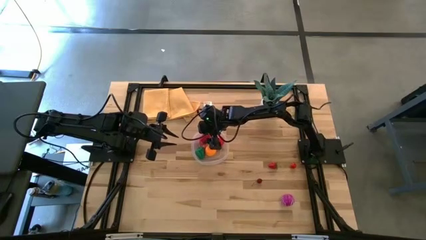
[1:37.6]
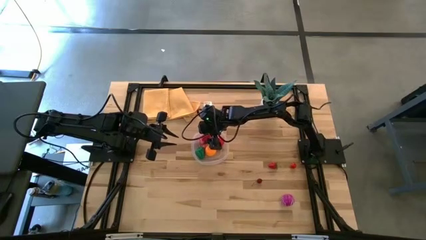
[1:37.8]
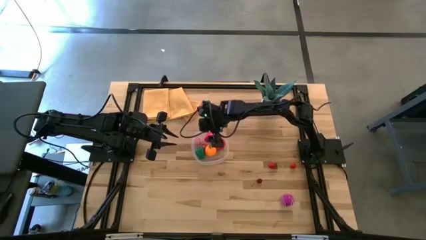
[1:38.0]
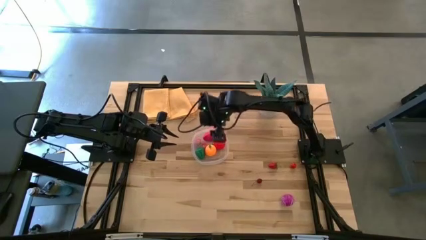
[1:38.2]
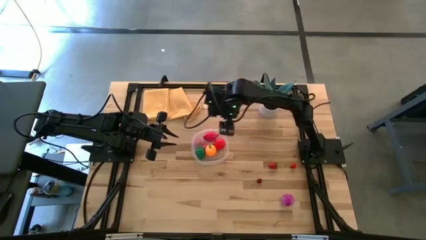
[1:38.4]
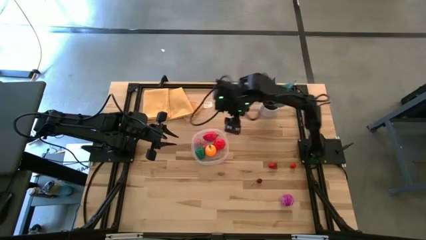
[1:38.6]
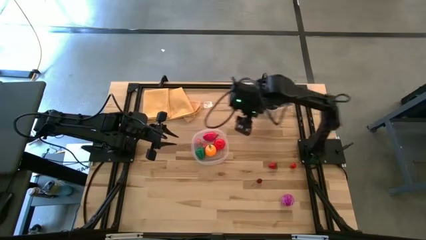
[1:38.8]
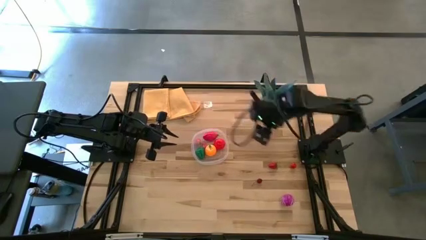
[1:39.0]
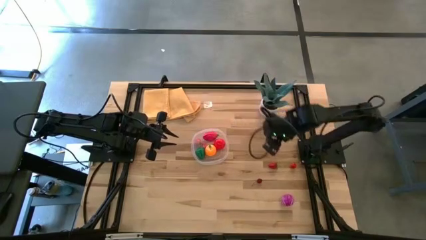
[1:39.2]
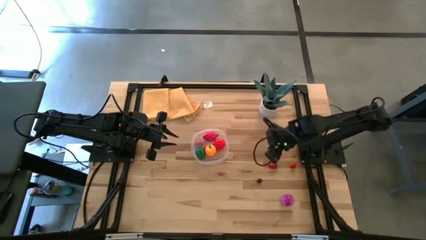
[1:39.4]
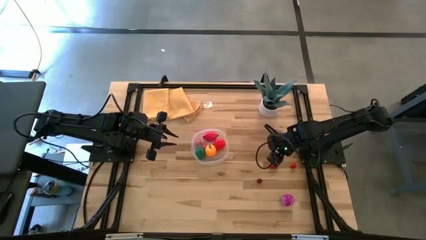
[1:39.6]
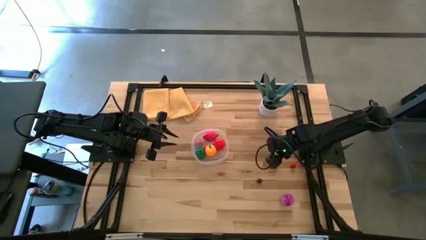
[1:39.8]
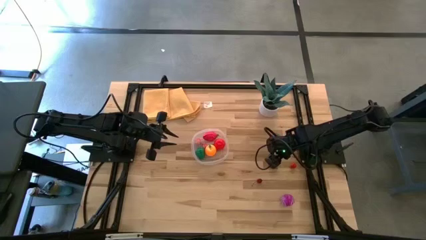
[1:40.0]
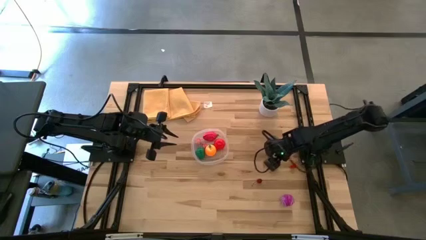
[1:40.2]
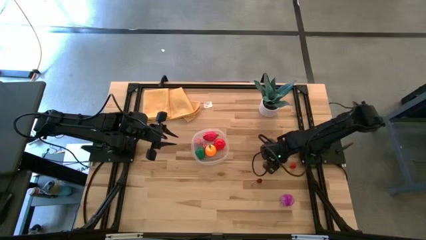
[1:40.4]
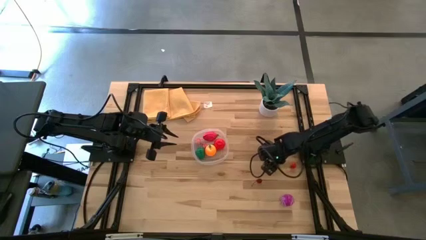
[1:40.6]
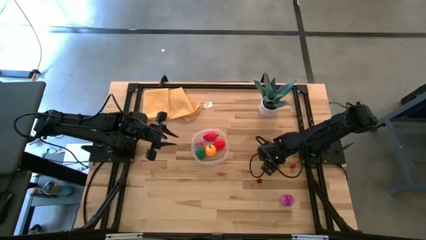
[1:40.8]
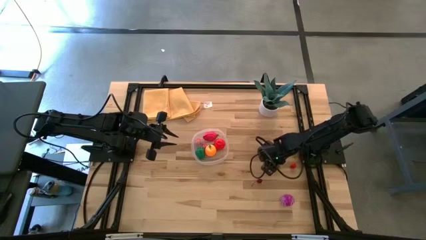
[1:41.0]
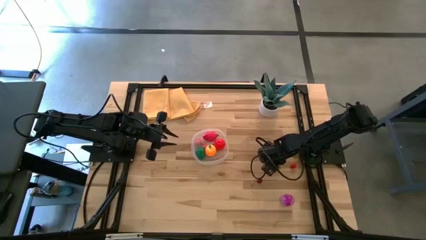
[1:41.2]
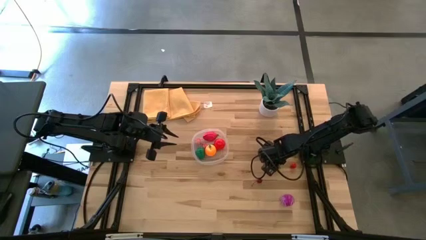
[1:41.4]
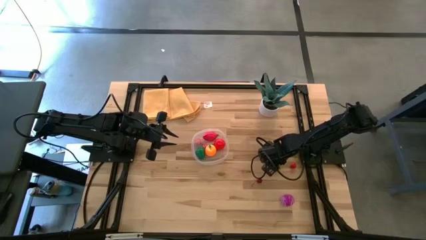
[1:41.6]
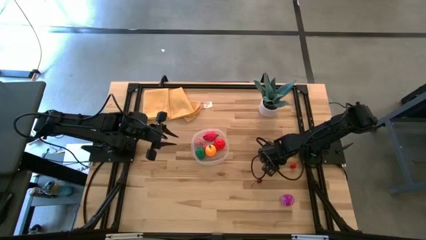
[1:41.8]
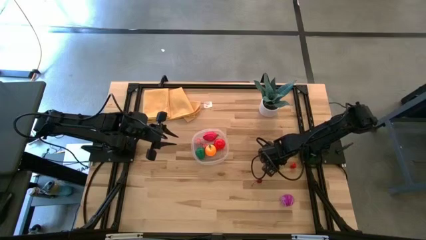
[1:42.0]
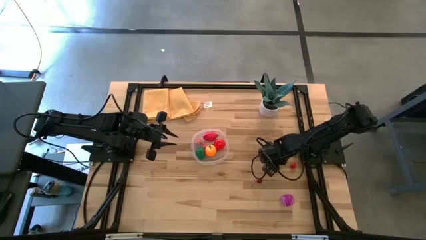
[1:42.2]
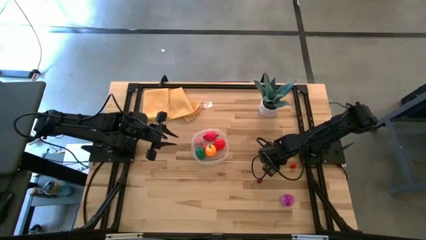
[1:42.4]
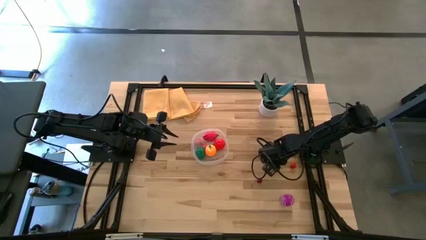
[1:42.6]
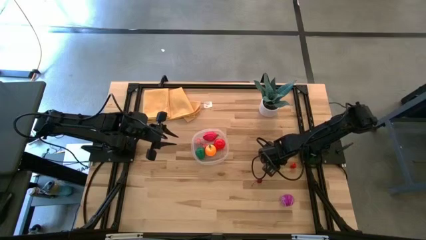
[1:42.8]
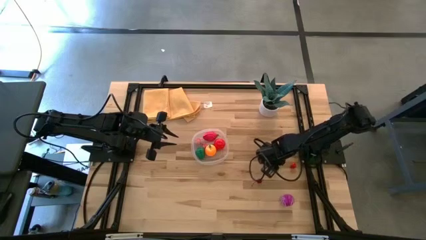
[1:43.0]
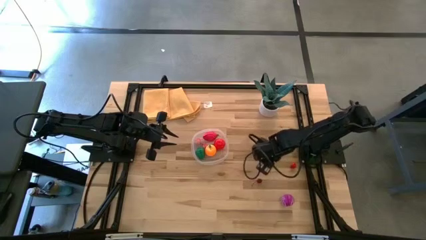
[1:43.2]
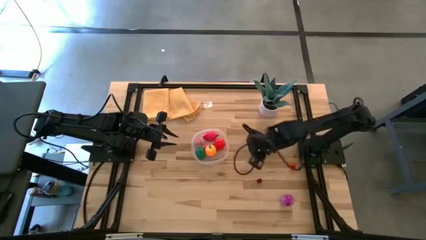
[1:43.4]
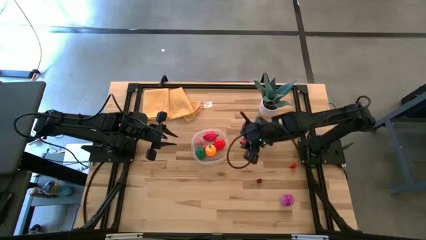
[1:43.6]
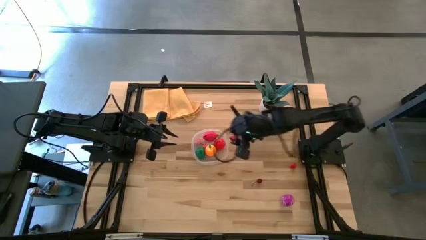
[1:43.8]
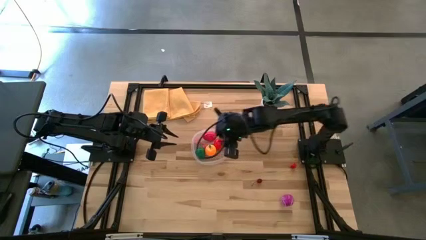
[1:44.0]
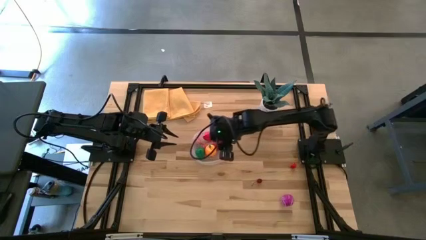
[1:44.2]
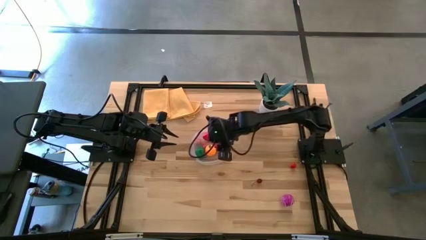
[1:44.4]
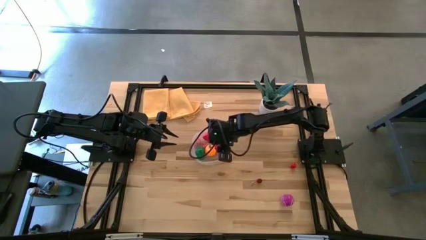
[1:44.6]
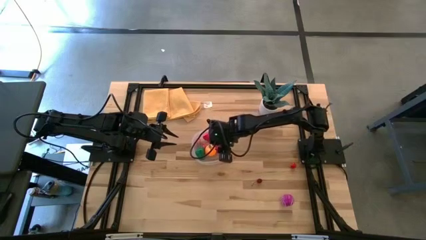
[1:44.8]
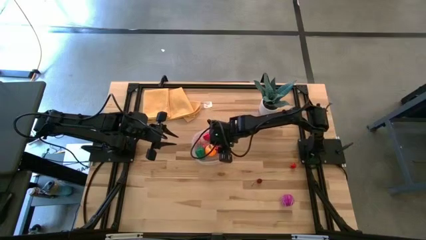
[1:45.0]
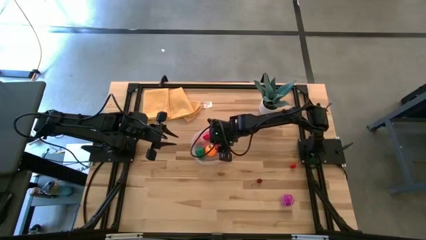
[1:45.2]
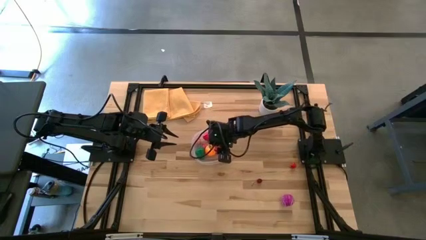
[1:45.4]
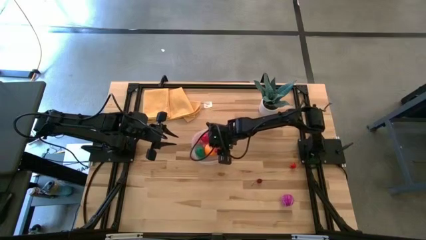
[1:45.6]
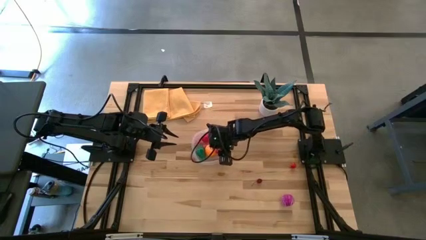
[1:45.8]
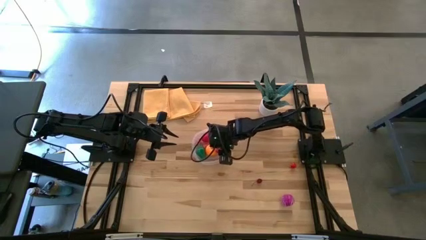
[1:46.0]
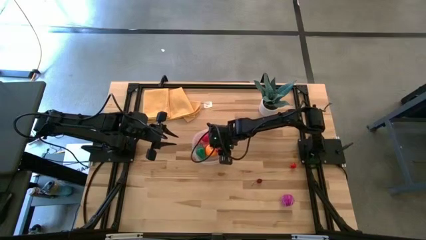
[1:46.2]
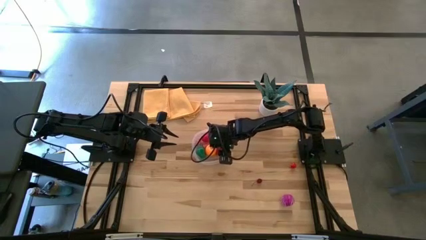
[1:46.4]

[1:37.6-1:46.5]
Task: Pick and placing Produce into tupperware
Put the red strawberry into the transparent bin

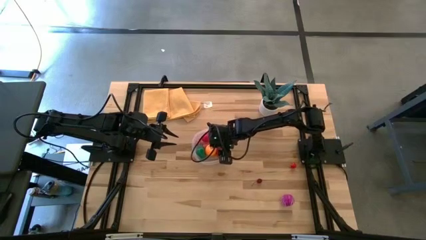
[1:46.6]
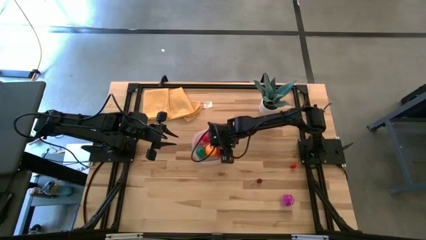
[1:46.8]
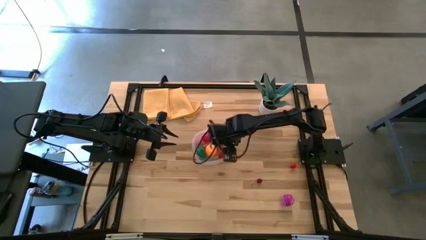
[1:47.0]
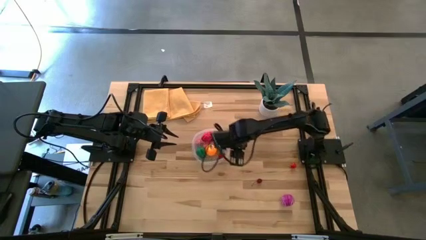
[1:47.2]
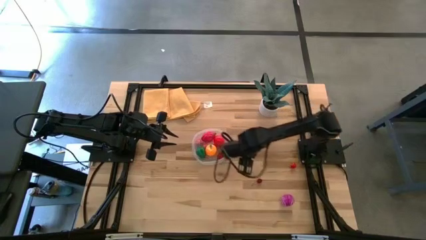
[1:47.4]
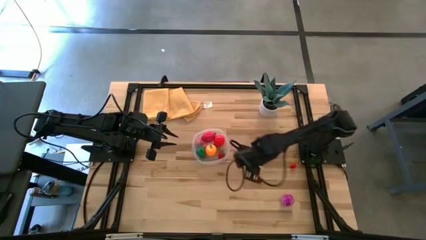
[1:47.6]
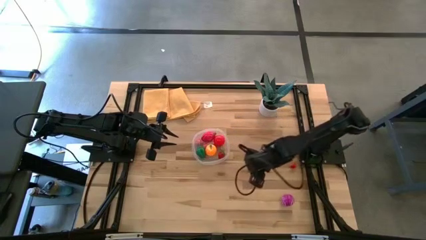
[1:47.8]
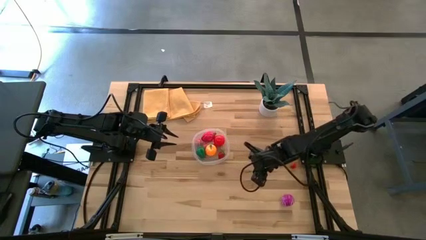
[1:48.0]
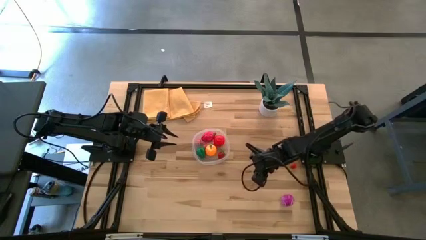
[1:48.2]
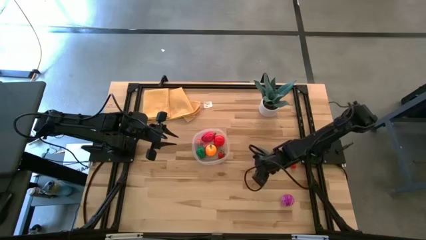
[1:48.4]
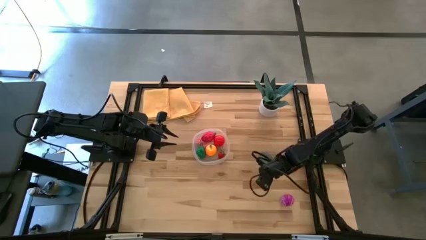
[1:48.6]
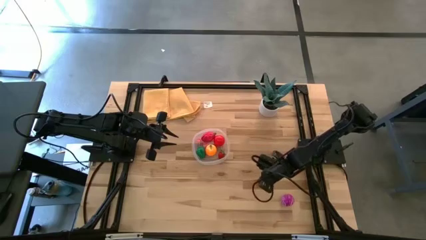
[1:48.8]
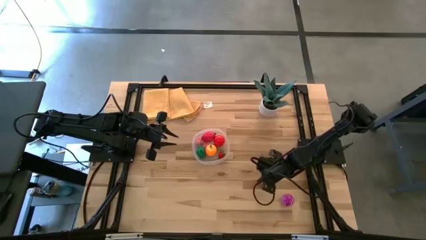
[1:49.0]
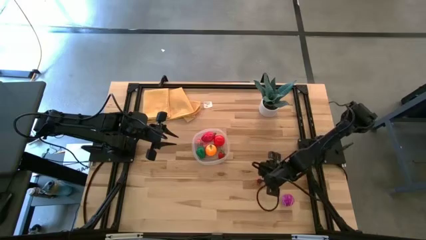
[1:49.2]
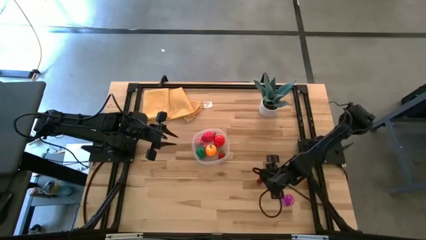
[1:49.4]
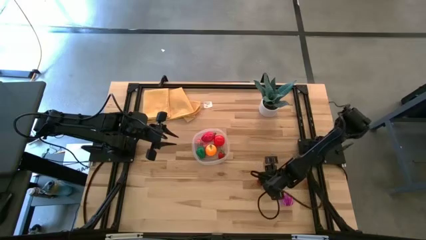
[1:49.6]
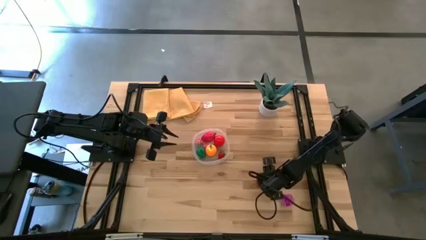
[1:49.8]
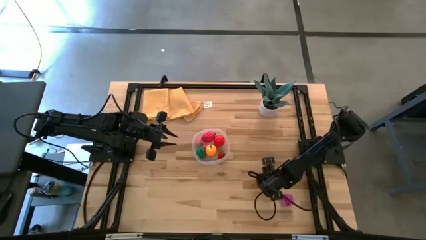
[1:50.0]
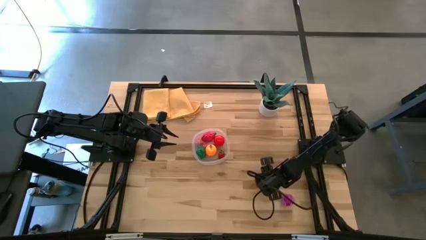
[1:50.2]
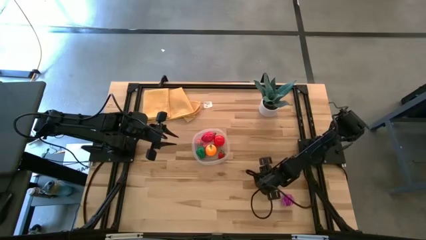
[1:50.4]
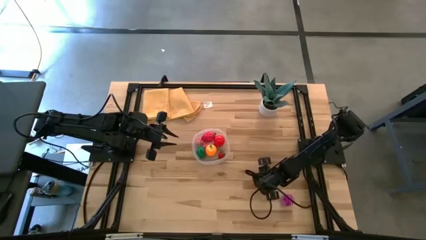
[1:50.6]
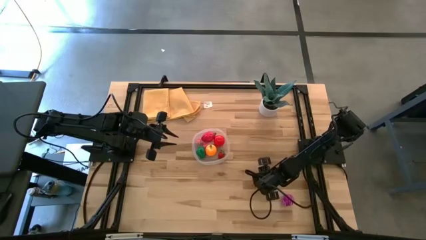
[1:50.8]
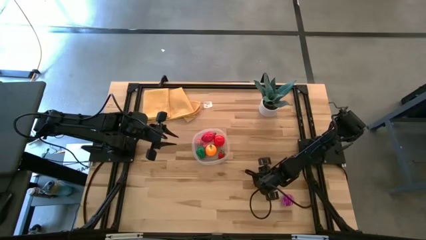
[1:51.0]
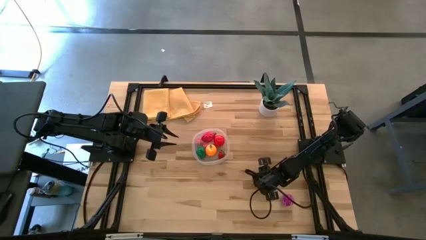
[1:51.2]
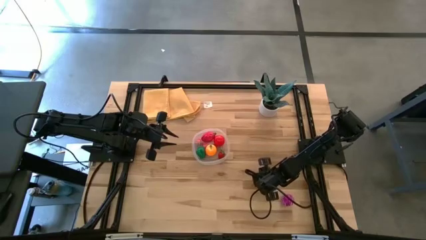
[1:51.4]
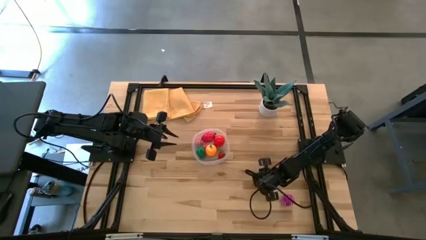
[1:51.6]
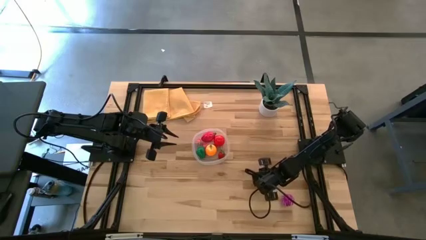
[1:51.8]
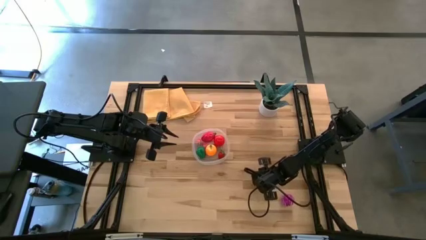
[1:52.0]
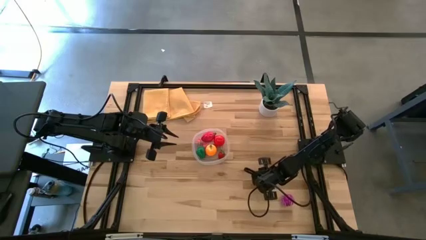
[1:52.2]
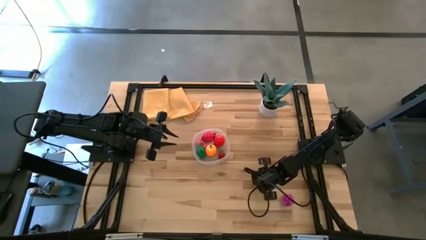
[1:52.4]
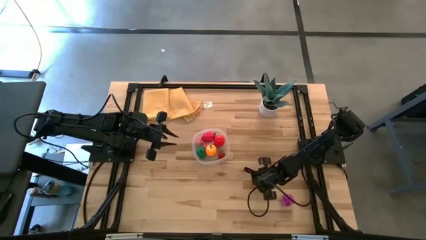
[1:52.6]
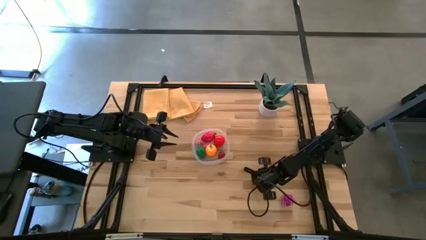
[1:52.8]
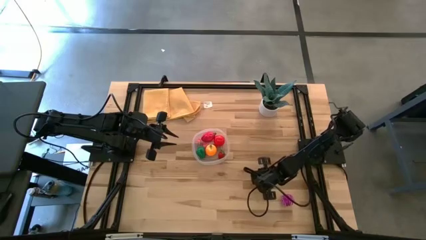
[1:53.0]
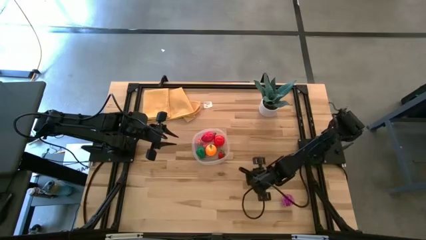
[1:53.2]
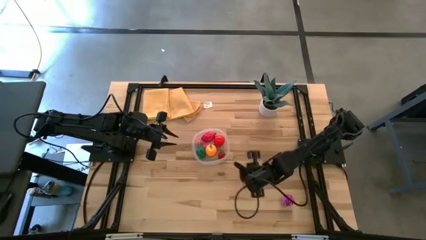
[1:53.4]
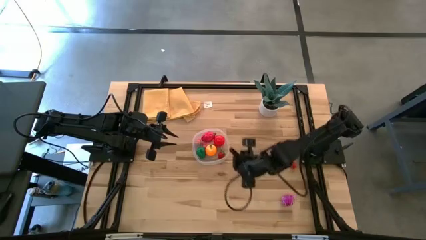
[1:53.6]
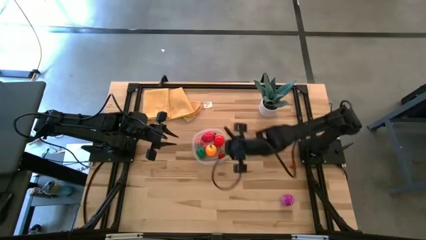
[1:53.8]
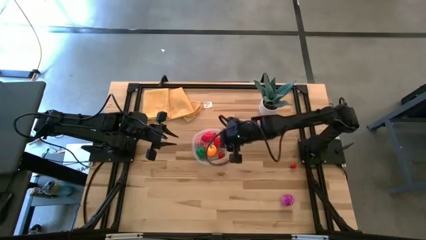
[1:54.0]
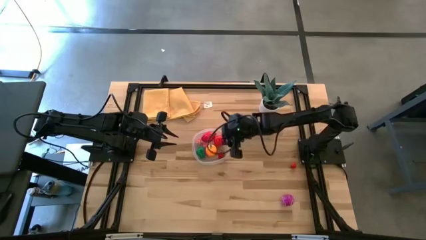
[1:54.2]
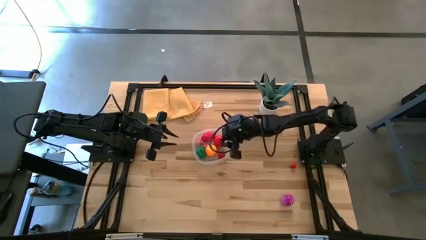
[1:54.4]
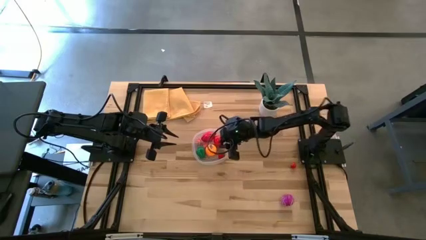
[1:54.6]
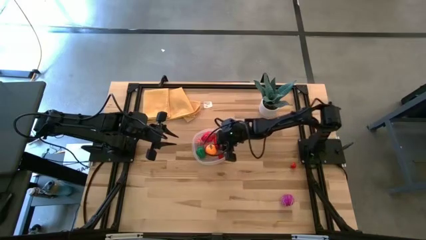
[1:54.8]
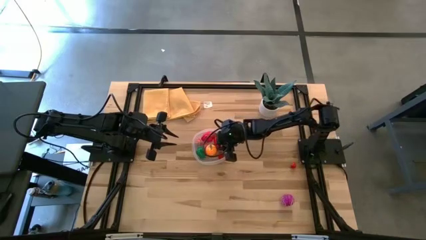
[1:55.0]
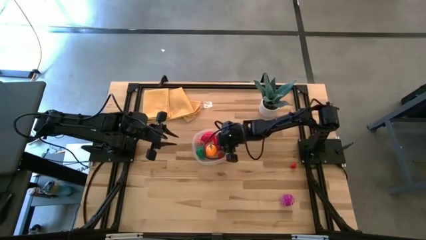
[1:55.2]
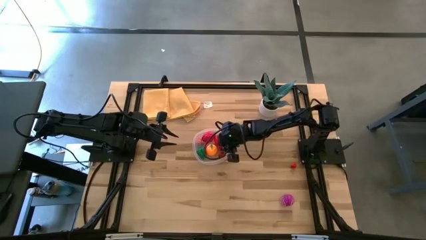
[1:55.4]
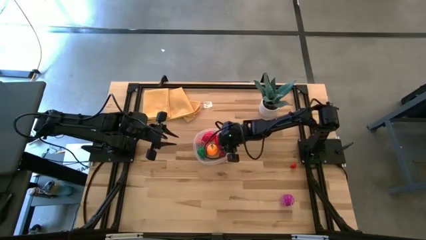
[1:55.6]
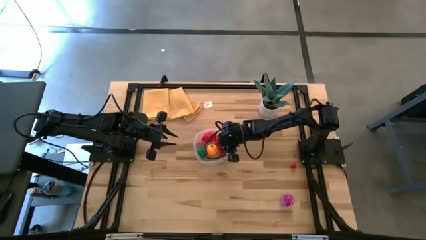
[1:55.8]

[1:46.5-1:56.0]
Put the left red cherry into the transparent bin
